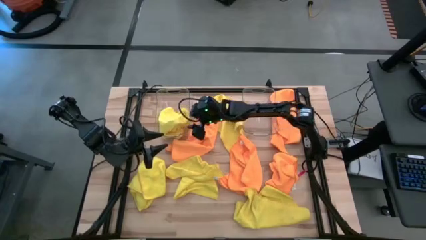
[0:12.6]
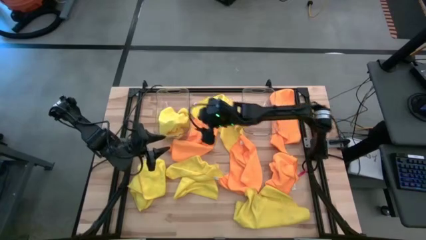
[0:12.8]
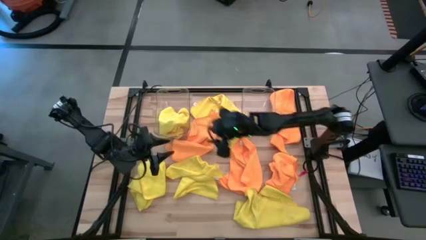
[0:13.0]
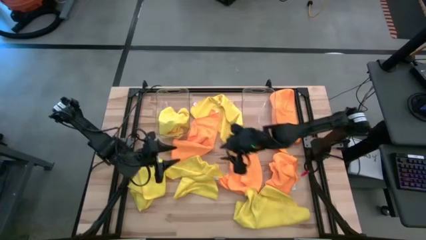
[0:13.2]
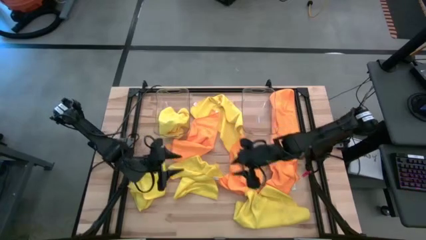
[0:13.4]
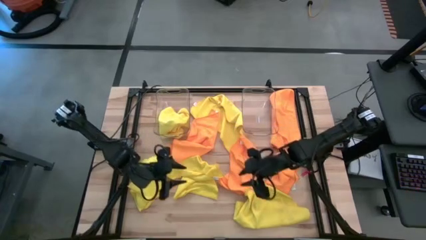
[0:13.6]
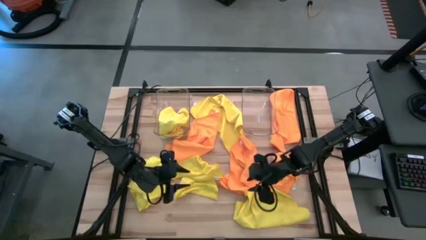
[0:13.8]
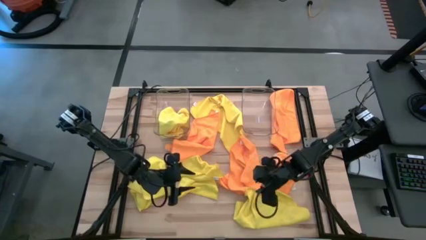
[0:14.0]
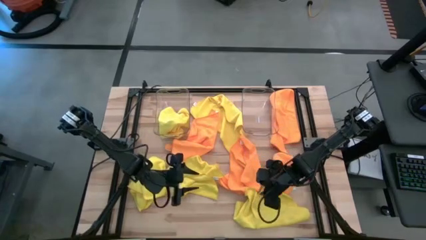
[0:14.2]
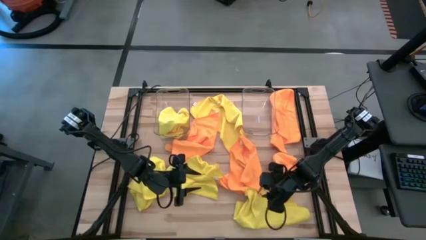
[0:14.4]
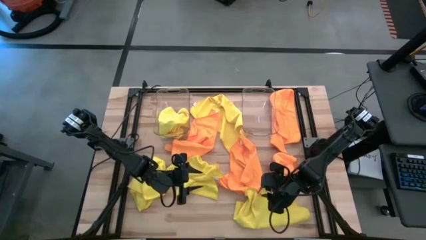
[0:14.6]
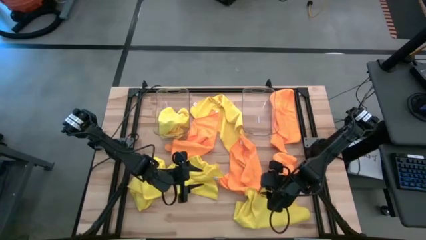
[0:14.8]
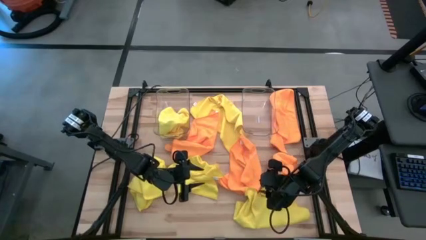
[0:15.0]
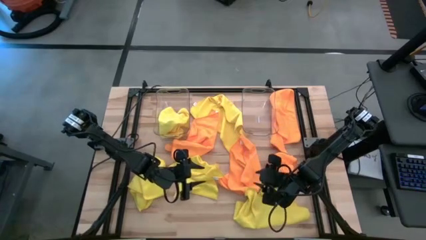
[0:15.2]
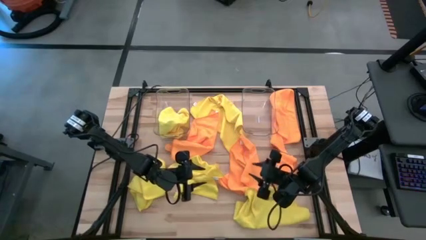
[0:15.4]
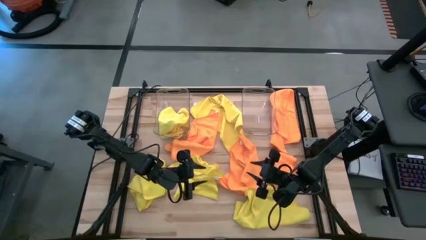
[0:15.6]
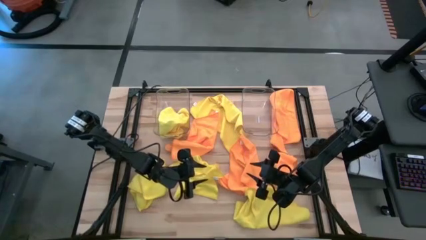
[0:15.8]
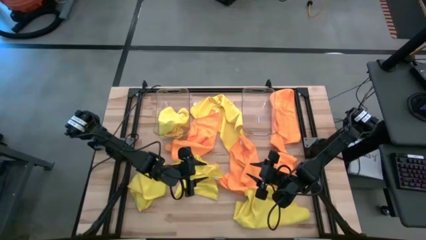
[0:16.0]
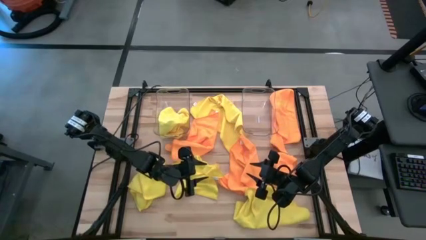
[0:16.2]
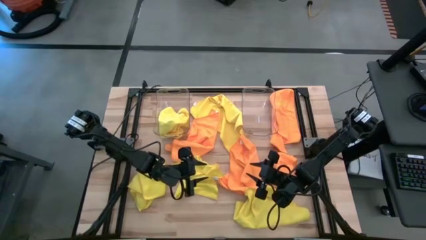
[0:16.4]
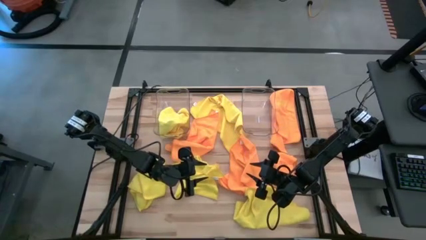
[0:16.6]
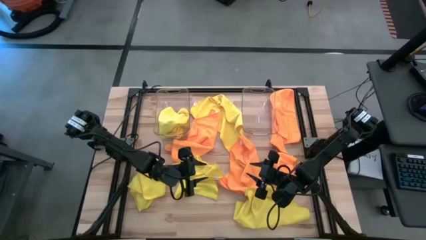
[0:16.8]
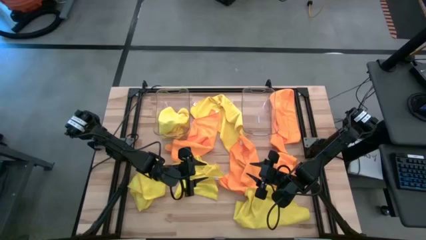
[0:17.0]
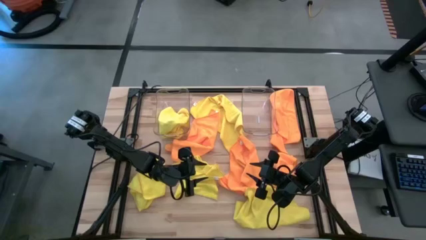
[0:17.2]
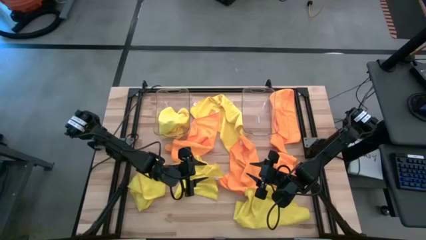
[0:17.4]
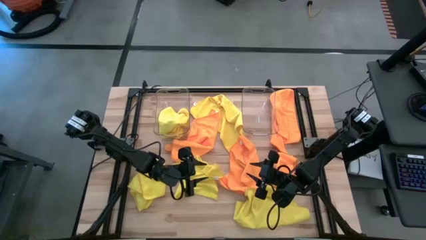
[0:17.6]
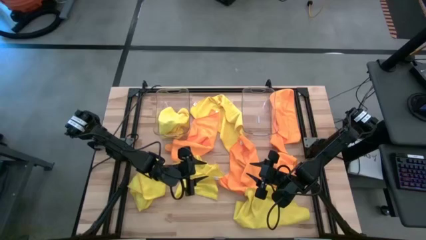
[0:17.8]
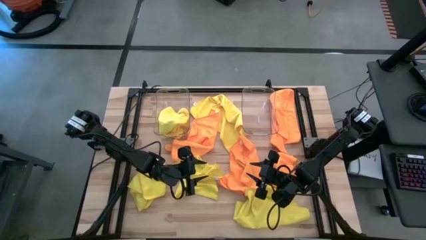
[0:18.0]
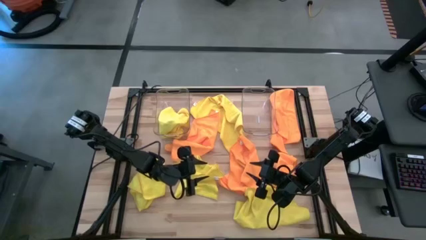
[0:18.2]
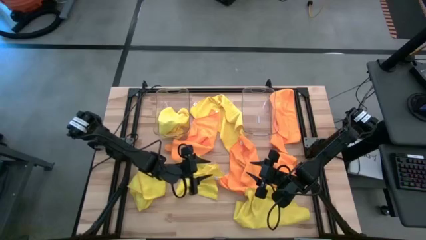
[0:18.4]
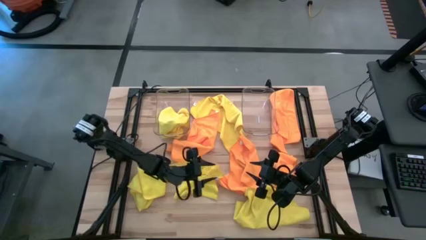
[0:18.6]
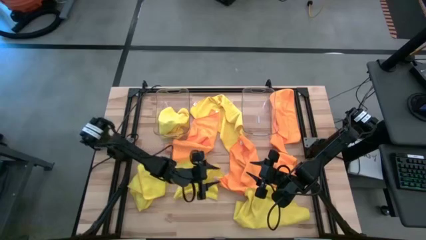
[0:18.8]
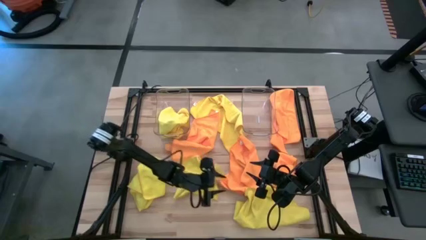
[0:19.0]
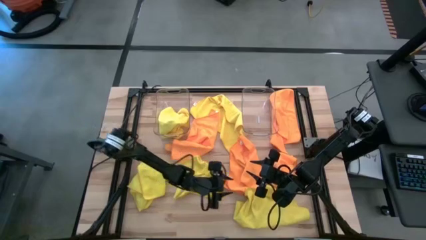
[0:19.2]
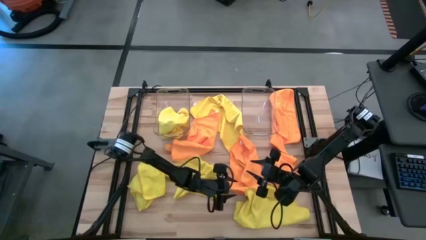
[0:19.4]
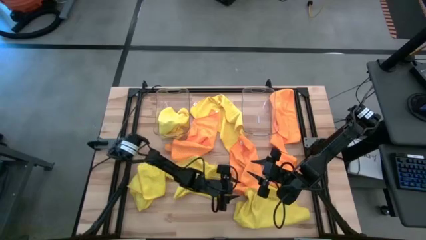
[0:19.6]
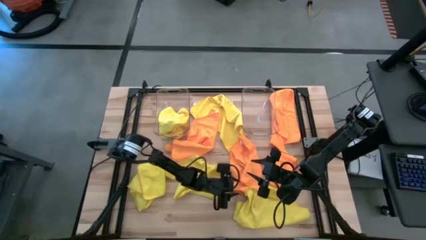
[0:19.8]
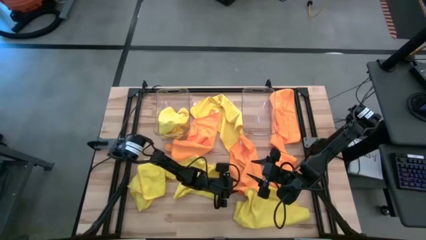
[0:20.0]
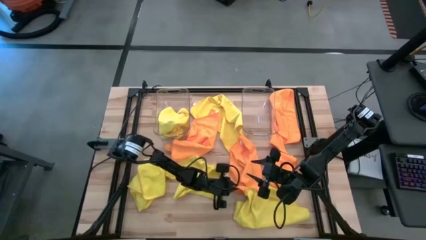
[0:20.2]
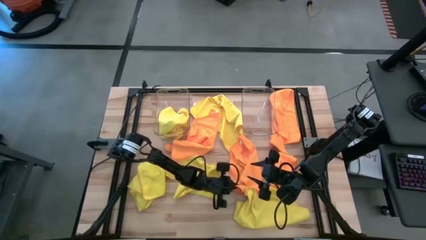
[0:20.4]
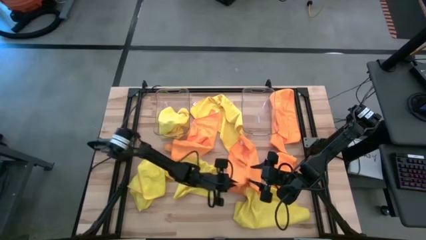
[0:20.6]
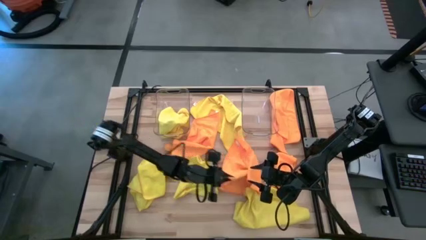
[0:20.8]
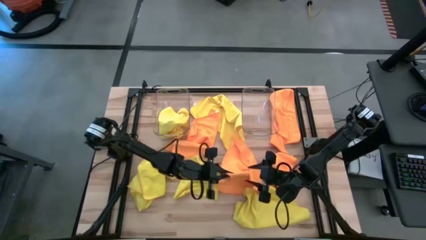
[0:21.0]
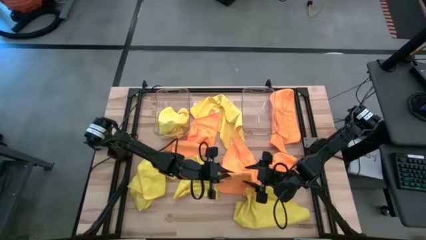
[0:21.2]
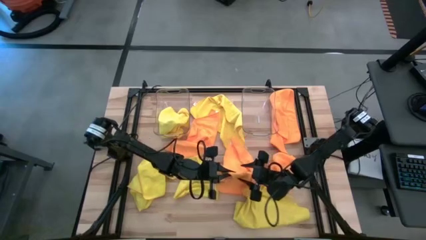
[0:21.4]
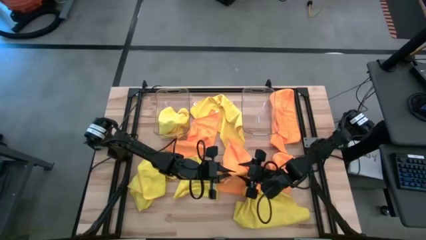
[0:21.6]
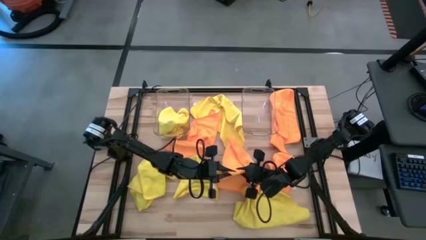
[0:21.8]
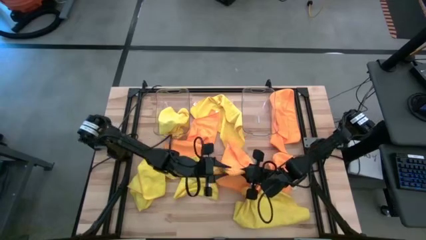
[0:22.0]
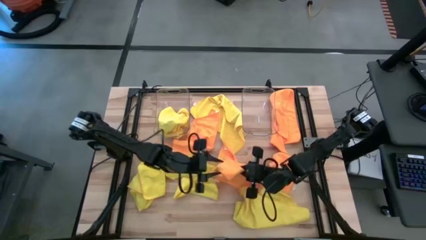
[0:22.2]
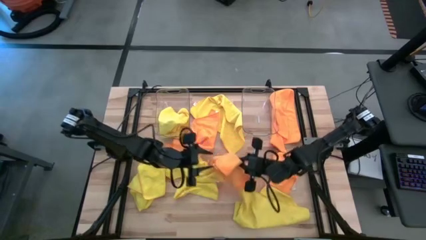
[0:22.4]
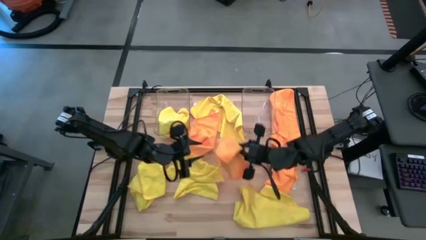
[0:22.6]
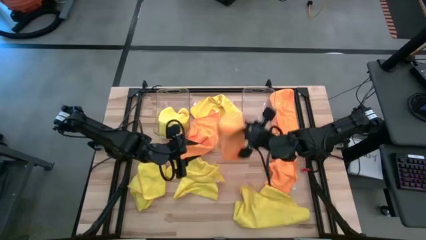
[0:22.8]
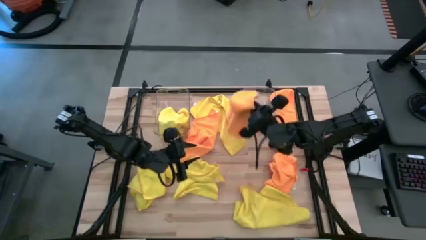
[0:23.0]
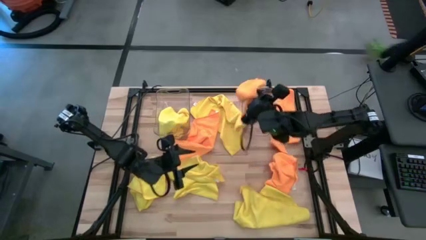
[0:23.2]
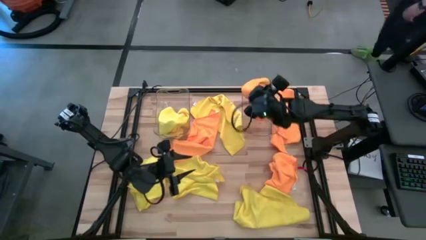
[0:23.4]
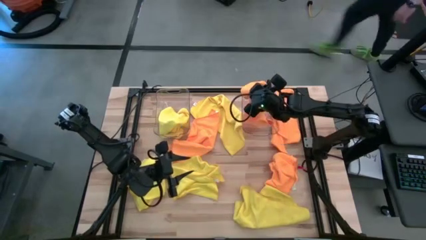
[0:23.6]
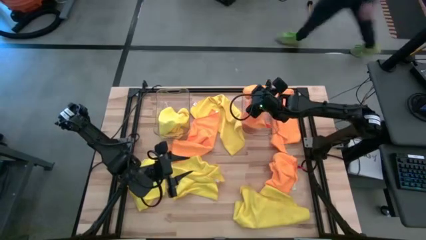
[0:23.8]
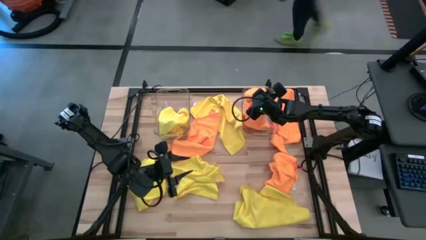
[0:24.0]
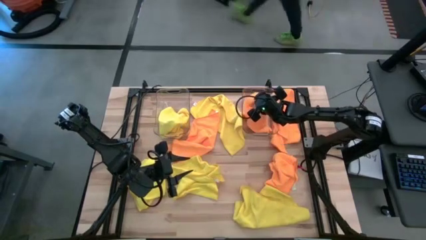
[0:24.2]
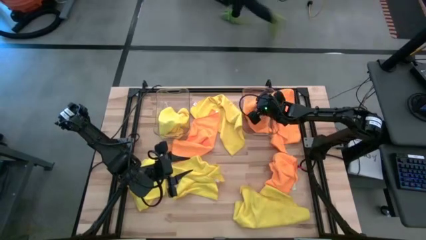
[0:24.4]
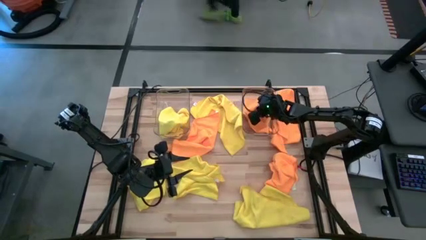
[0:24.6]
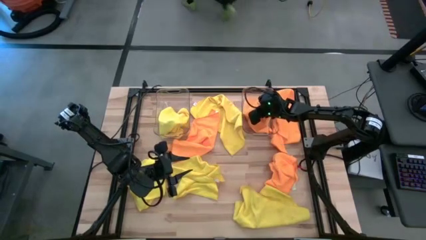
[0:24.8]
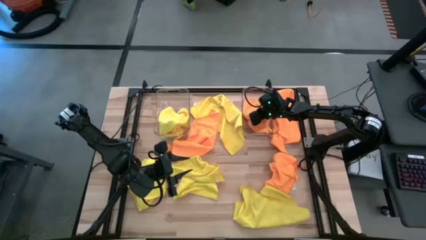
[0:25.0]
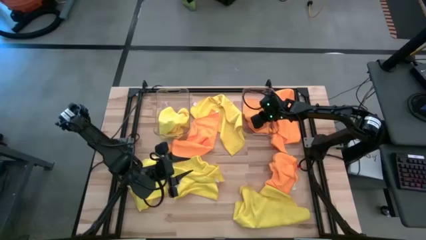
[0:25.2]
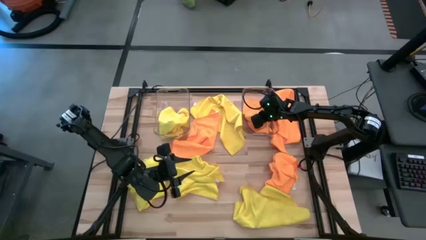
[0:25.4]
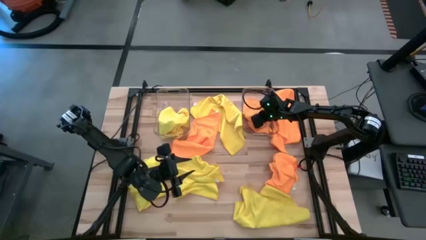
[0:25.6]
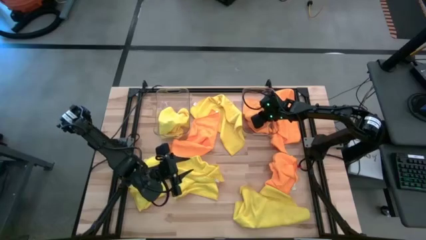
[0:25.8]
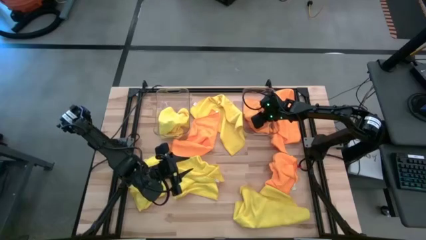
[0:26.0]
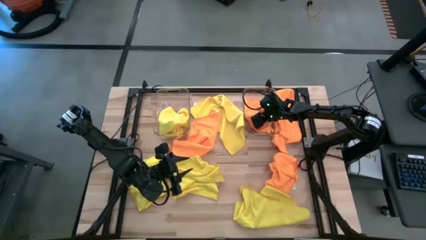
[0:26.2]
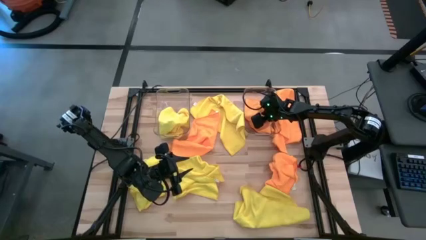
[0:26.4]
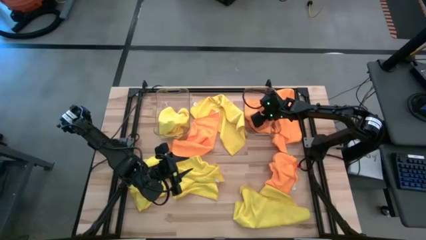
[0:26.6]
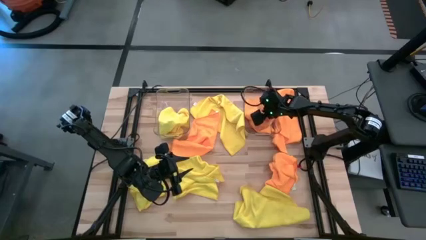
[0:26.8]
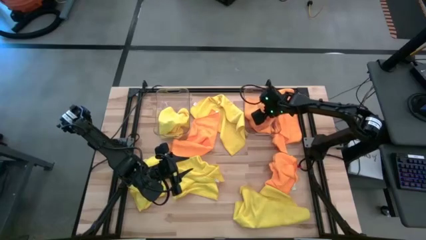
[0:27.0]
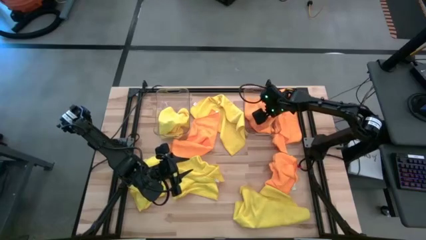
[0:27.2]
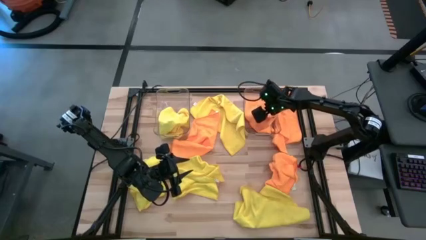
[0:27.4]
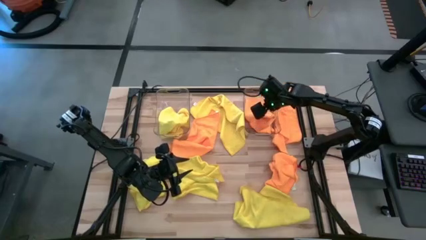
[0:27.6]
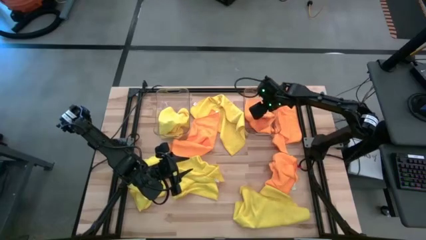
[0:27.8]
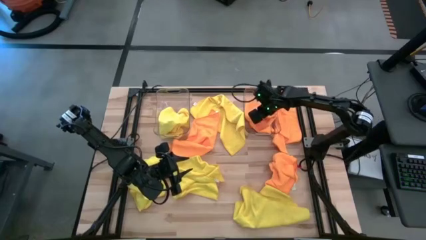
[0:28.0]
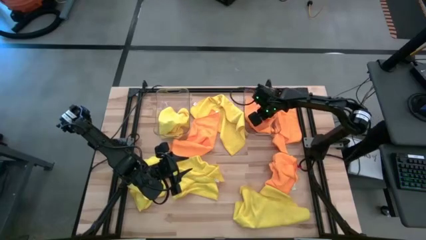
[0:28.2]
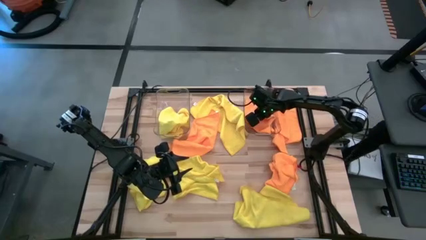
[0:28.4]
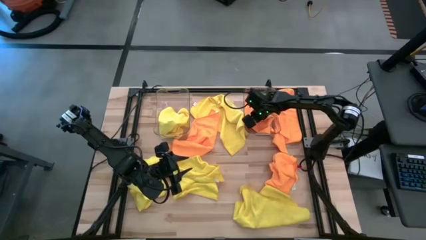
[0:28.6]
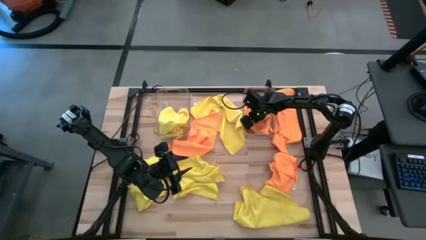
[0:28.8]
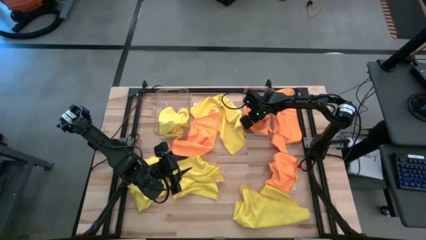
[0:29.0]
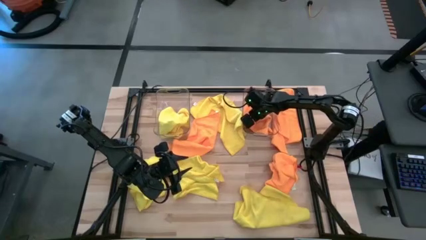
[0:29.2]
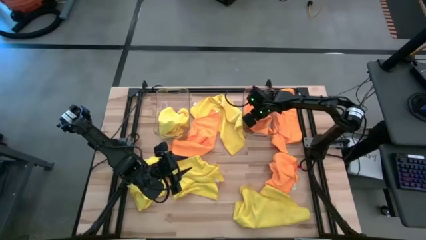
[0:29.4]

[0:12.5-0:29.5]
Task: Sort microfiber towel by color & place in baskets
Put the orange microfiber cloth into the right transparent bin
